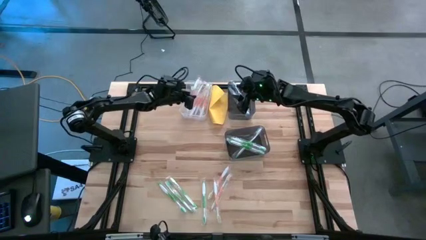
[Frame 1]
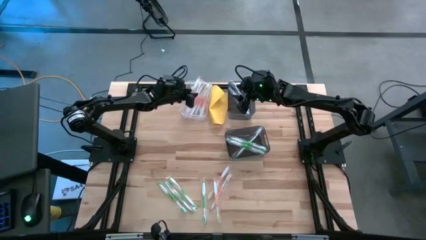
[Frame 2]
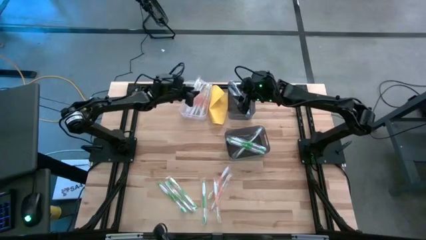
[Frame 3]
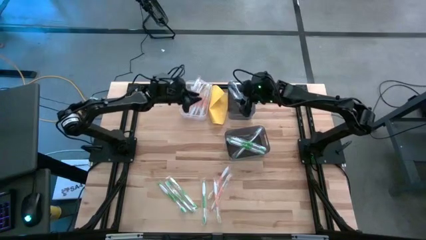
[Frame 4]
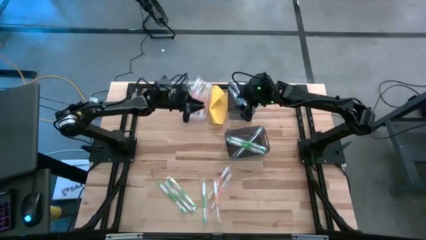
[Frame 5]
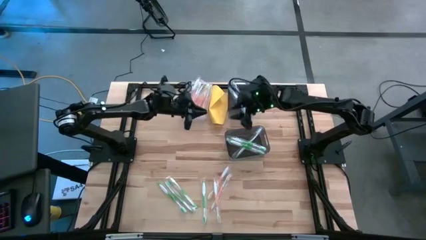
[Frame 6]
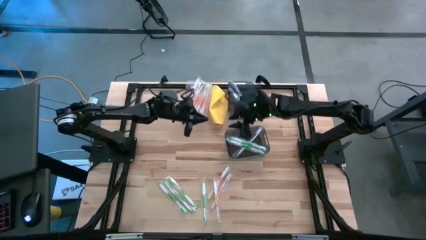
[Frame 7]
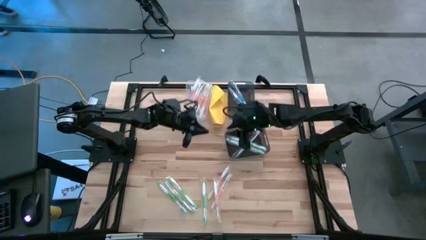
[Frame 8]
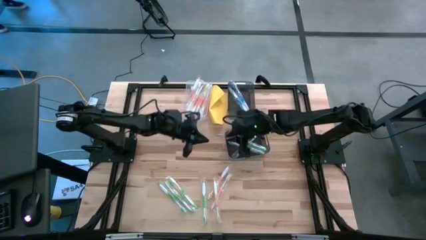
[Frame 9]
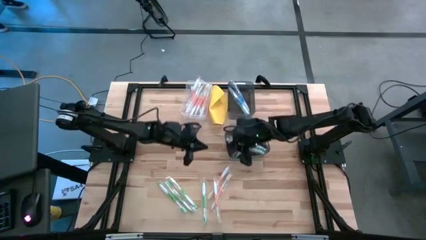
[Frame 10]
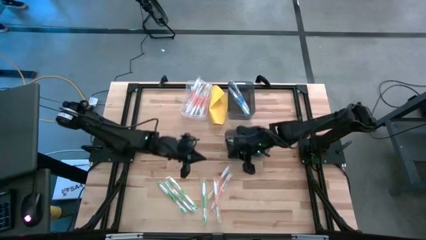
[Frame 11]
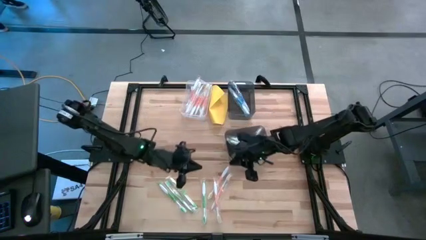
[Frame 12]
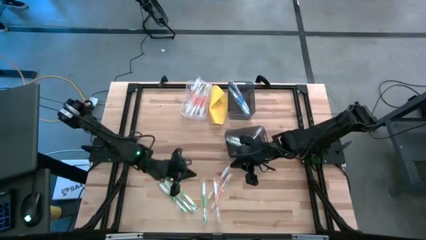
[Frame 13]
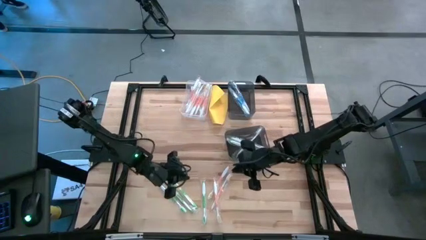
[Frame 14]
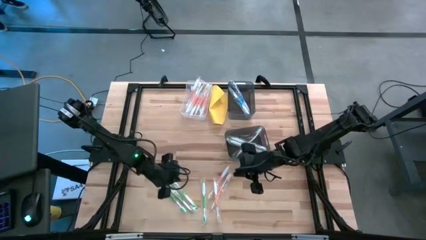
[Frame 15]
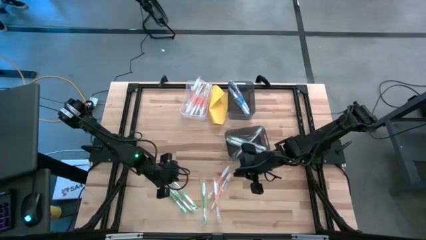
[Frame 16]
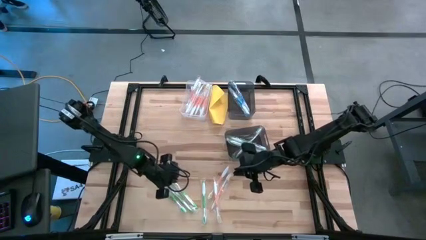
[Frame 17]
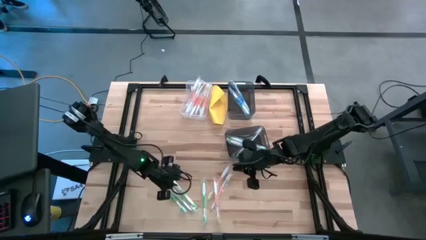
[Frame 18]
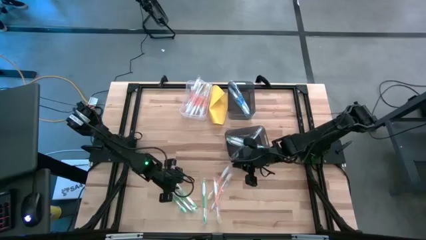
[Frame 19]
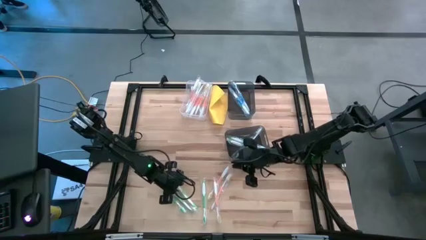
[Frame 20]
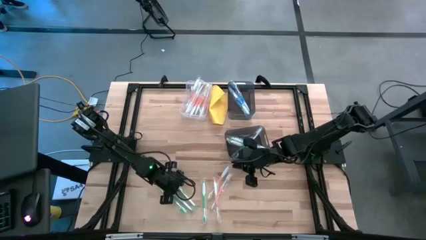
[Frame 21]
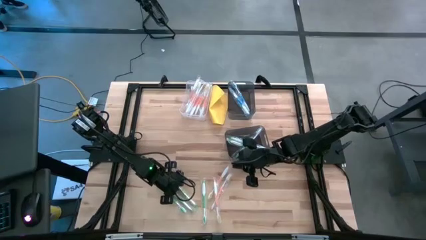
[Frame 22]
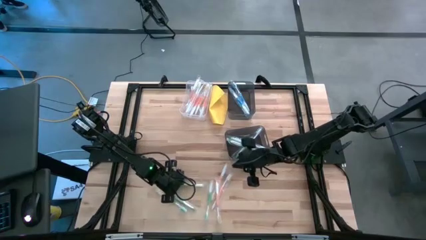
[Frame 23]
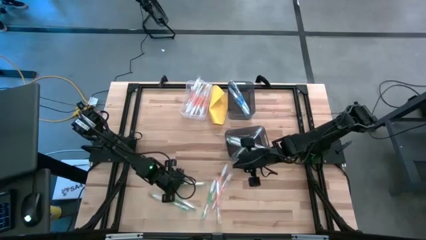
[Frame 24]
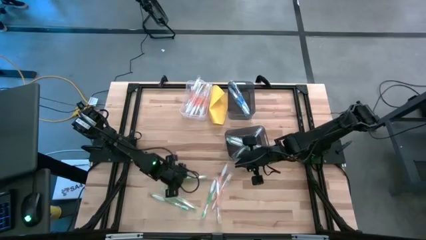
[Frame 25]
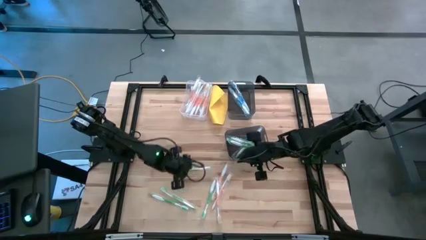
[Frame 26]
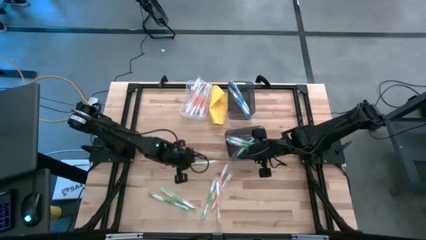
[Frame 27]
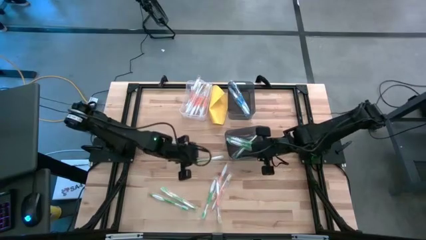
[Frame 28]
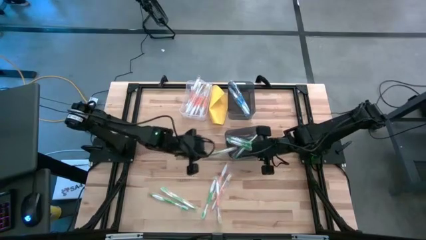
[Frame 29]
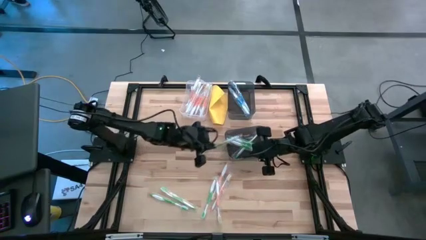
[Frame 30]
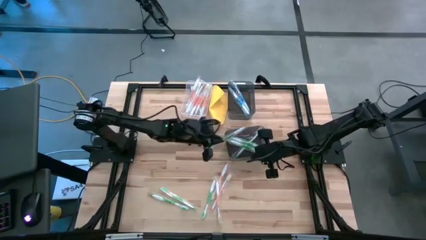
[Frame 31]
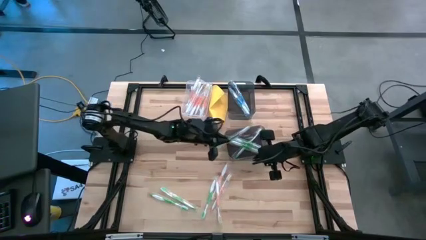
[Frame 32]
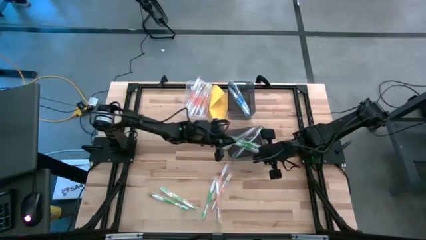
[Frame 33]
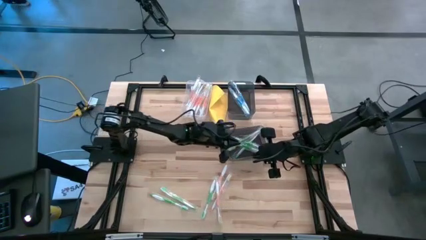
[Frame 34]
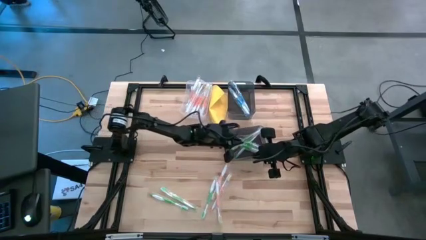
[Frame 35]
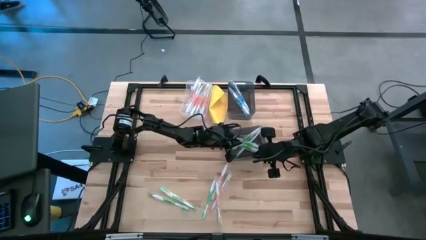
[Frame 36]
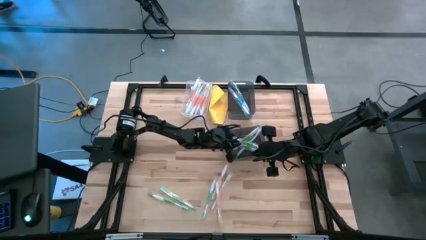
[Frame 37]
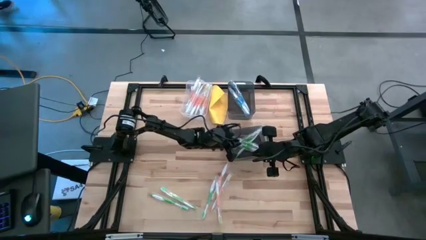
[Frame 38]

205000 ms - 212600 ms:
Task: Pick & Place Toothbrushes
Put the green toothbrush into the bottom black transparent bin

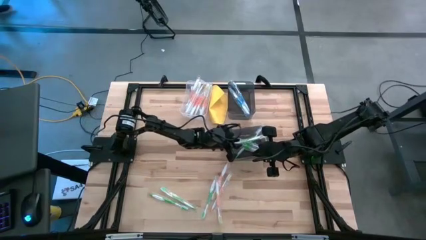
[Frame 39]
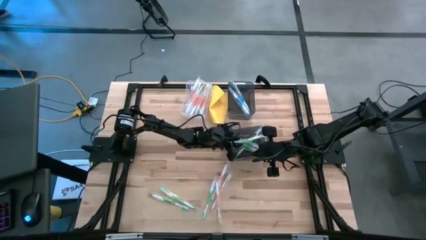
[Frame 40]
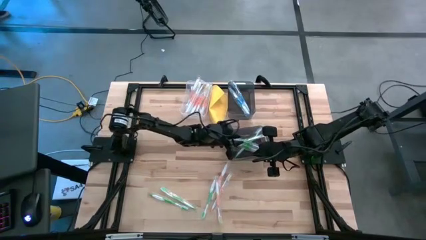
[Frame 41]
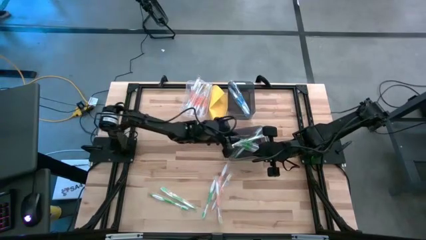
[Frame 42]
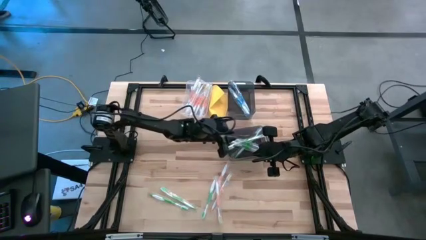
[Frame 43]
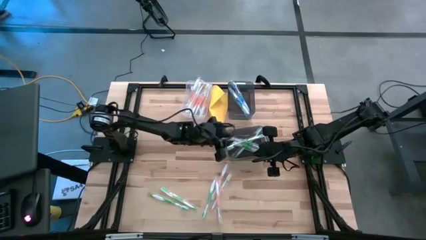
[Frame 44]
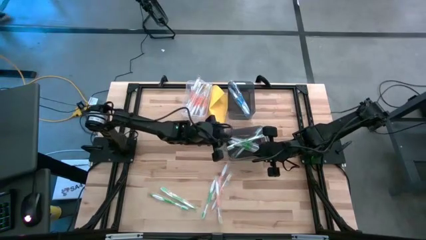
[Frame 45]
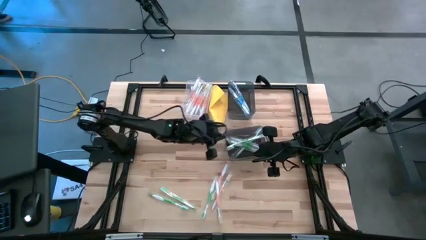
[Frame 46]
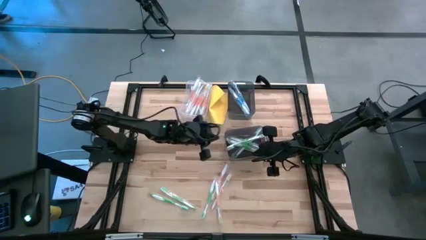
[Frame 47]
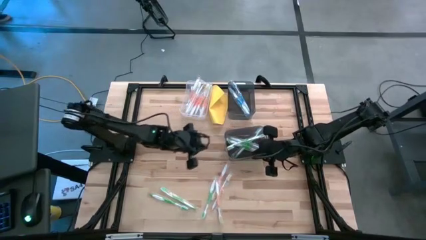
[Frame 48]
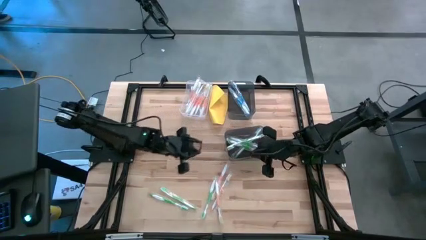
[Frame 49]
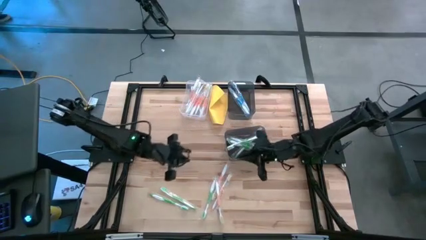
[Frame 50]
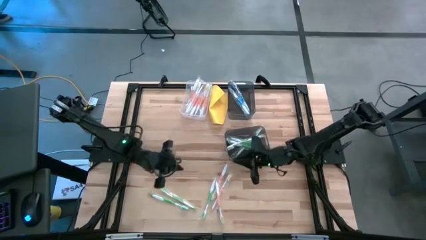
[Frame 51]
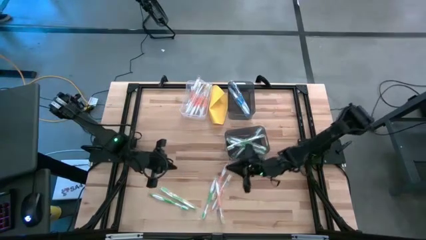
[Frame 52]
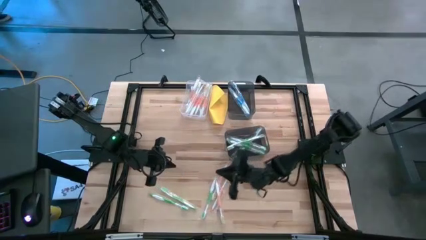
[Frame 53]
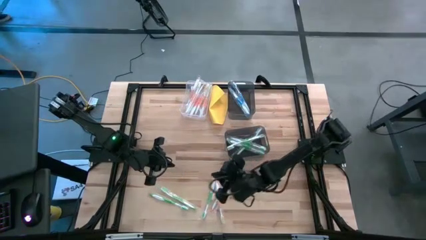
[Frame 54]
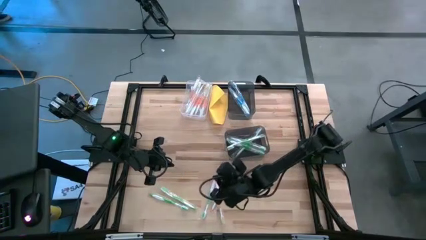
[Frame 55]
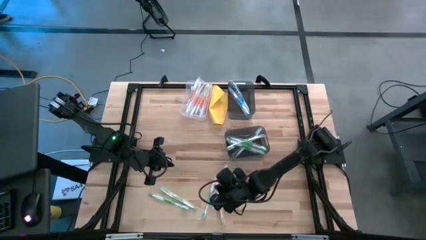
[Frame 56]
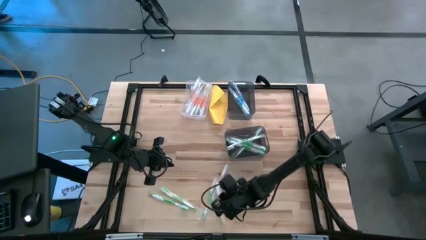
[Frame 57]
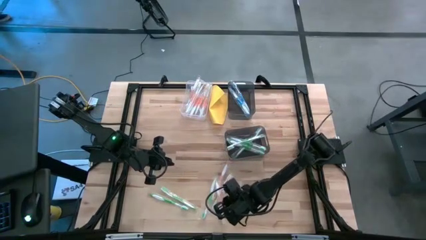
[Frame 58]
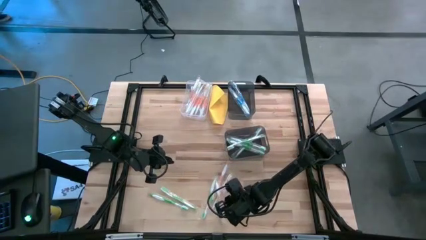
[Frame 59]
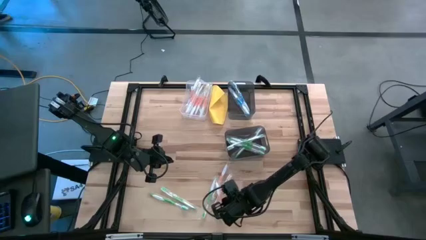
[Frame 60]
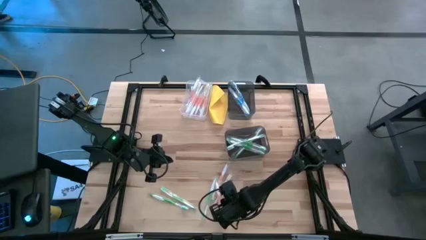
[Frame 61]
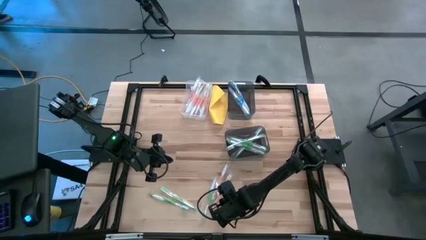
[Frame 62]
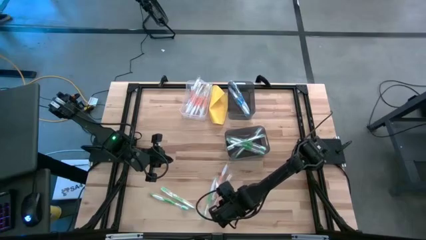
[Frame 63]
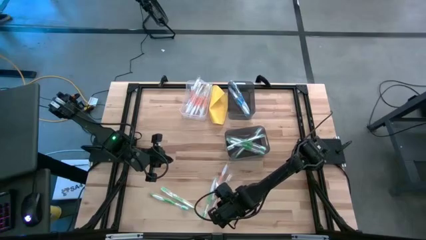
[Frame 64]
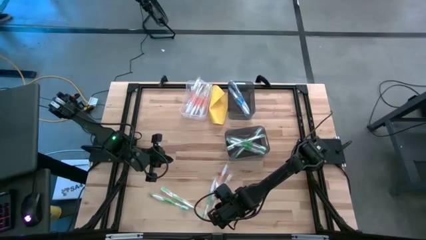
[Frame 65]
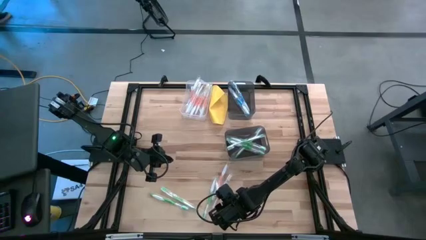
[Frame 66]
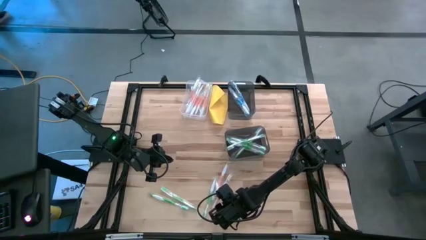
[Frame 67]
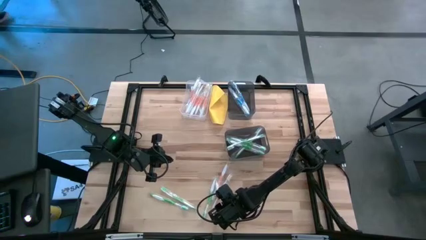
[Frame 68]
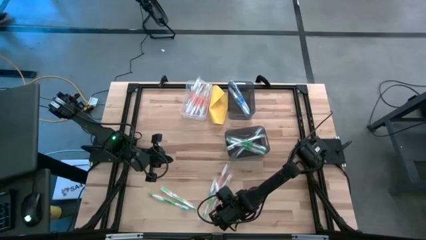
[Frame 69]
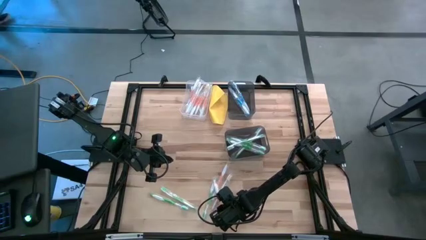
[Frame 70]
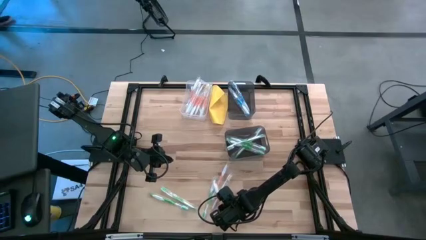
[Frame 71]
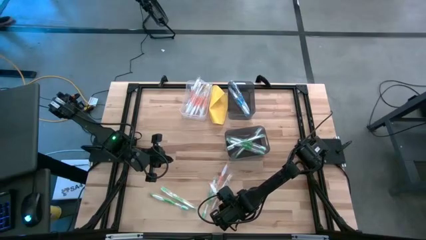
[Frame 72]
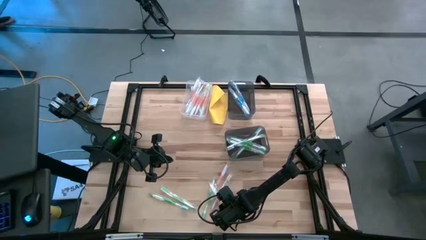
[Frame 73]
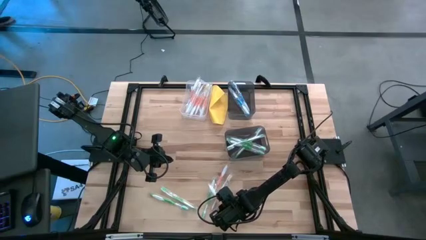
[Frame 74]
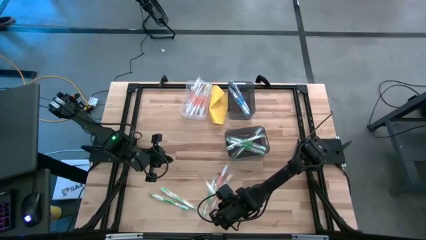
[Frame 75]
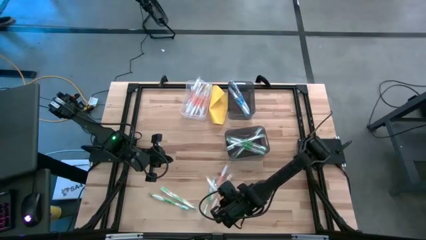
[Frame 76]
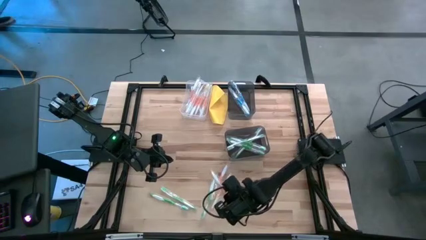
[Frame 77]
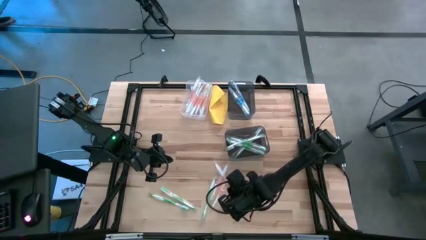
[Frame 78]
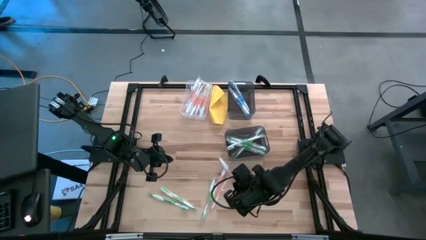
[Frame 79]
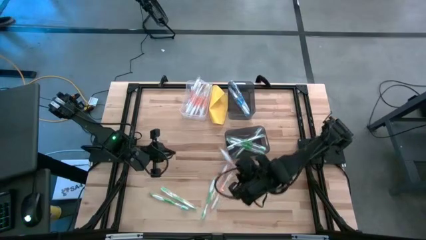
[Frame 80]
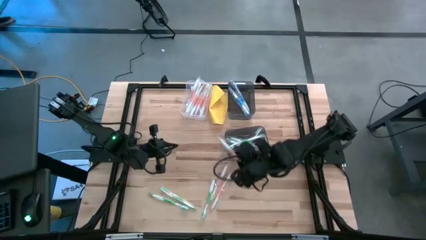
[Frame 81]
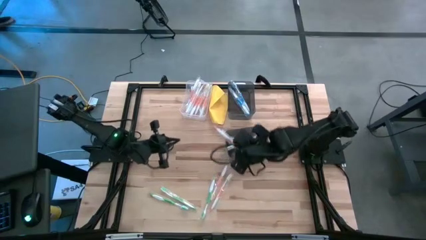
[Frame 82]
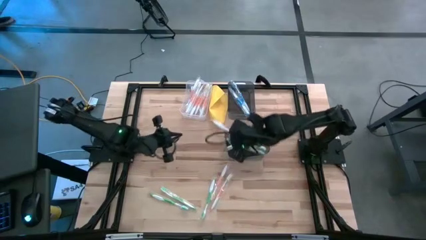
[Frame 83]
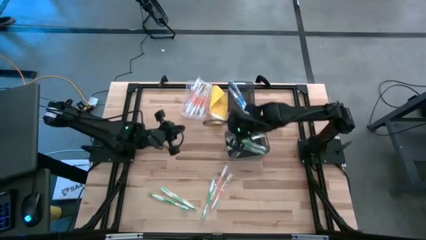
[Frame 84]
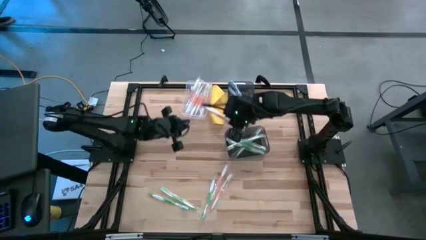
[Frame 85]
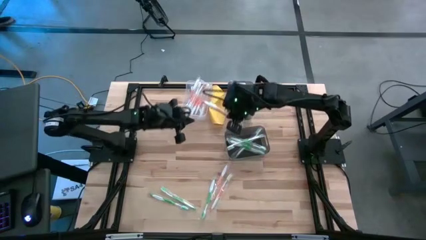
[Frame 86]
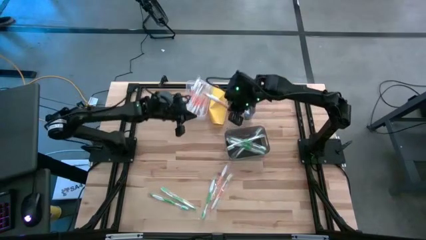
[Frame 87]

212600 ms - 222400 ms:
Put the orange toothbrush into the transparent bin
